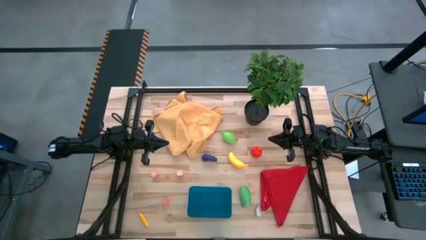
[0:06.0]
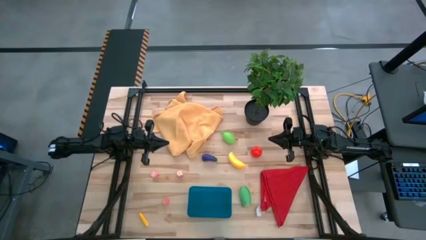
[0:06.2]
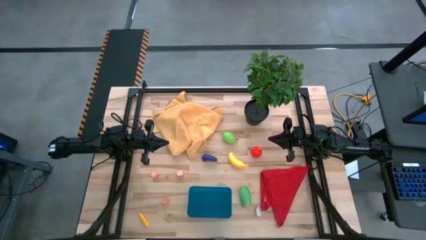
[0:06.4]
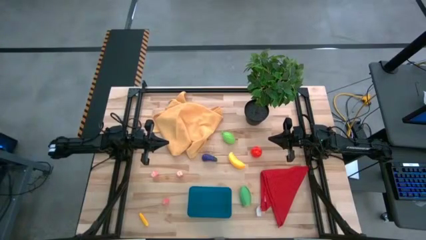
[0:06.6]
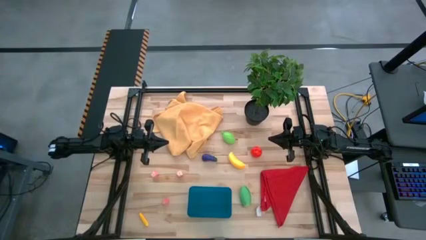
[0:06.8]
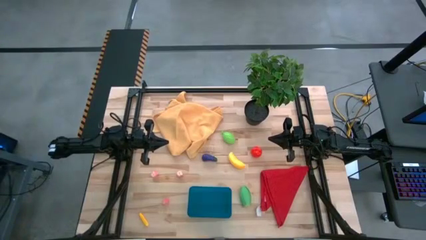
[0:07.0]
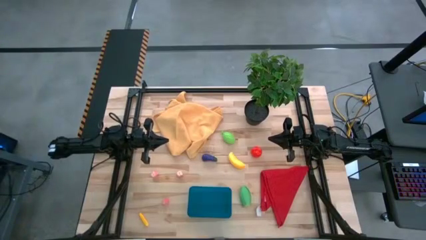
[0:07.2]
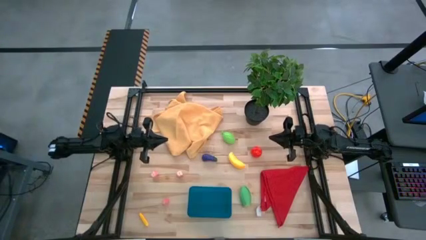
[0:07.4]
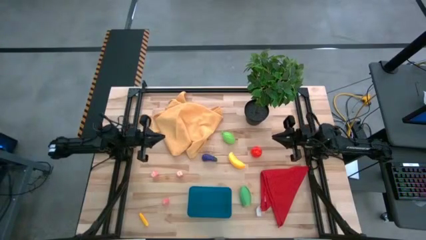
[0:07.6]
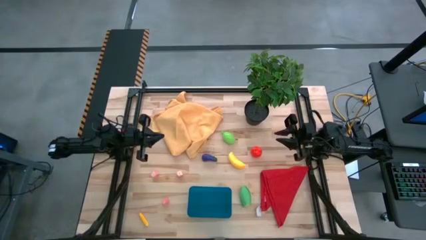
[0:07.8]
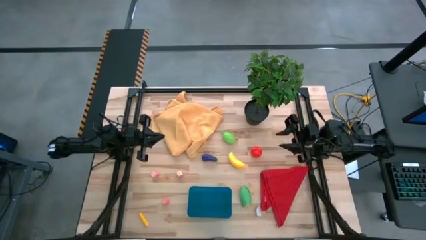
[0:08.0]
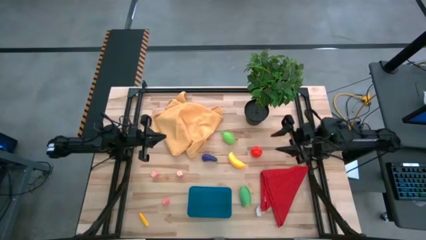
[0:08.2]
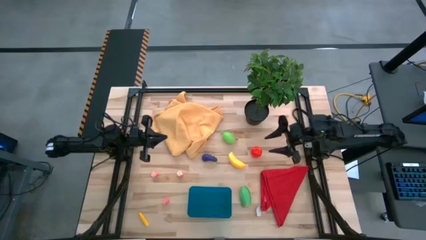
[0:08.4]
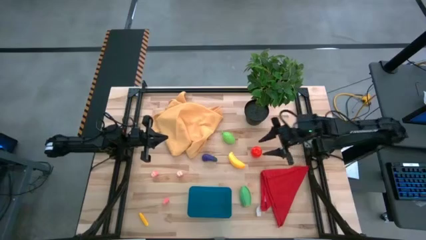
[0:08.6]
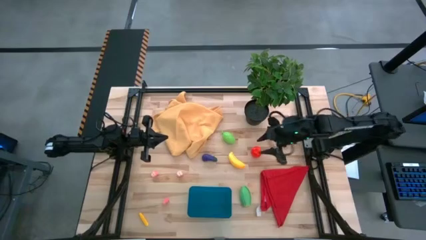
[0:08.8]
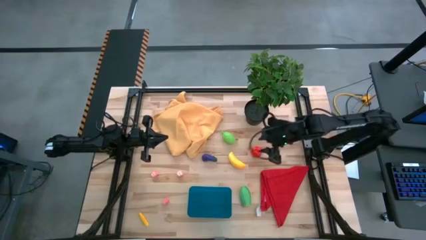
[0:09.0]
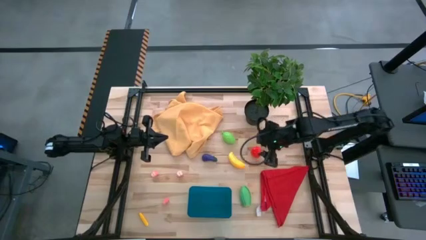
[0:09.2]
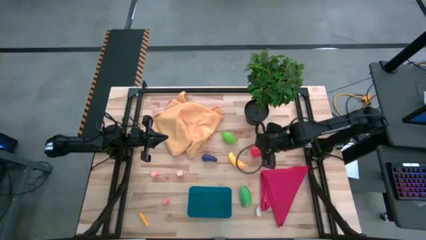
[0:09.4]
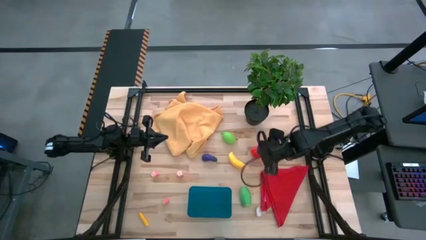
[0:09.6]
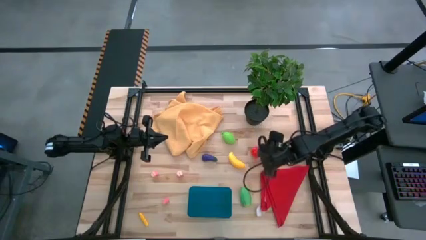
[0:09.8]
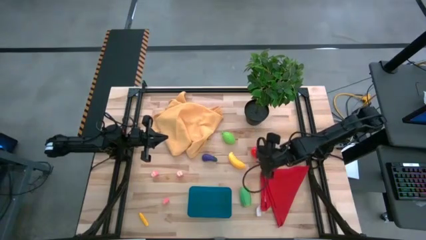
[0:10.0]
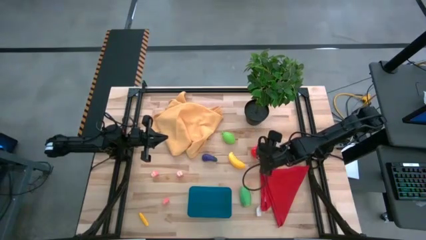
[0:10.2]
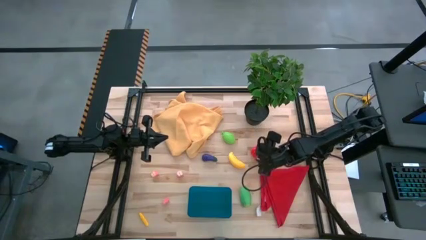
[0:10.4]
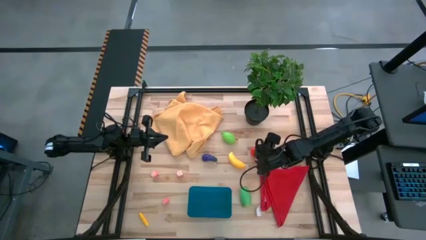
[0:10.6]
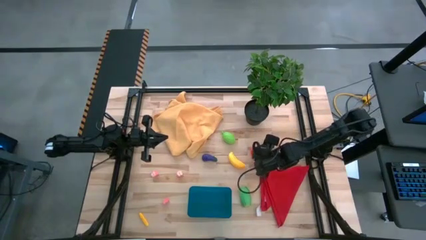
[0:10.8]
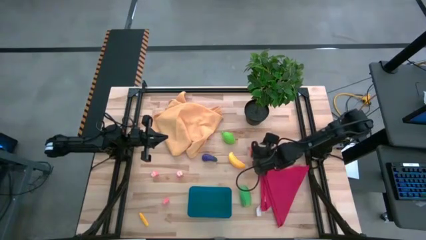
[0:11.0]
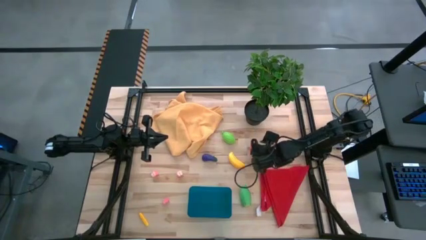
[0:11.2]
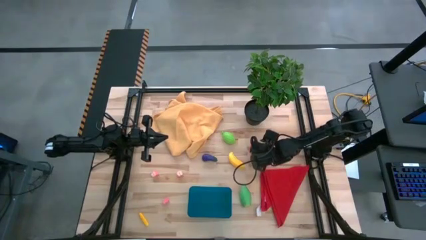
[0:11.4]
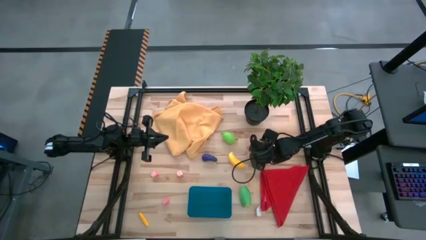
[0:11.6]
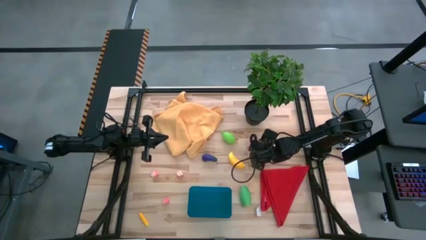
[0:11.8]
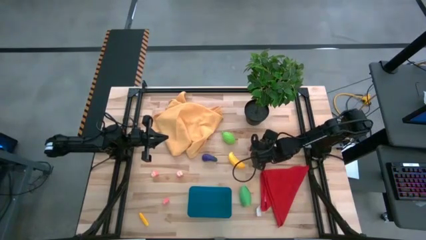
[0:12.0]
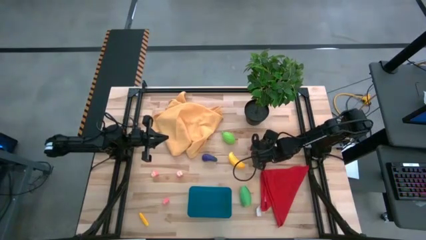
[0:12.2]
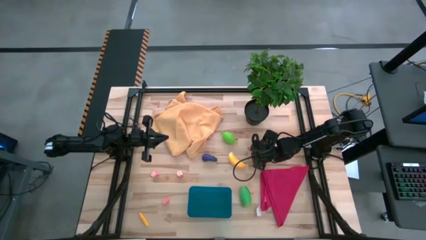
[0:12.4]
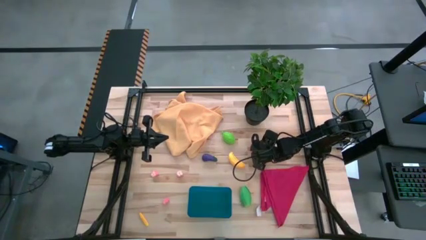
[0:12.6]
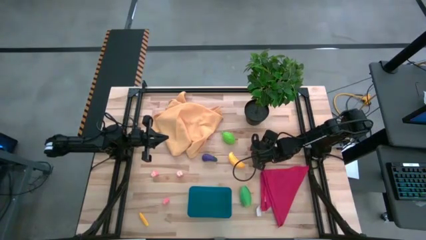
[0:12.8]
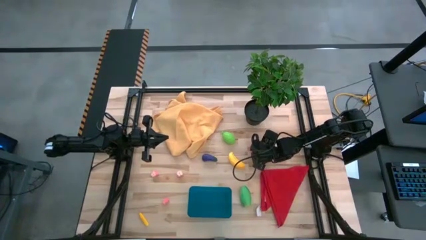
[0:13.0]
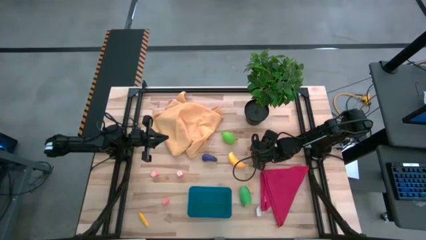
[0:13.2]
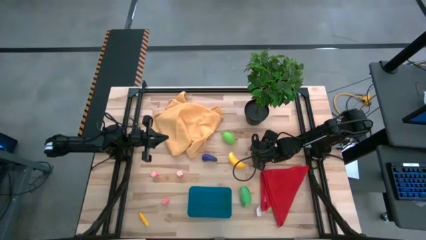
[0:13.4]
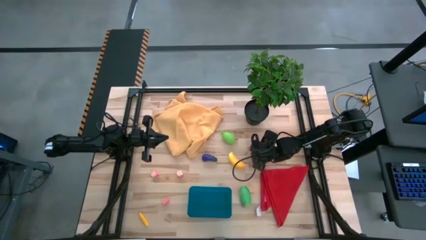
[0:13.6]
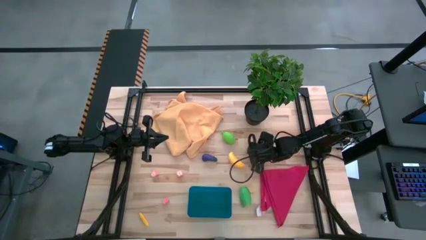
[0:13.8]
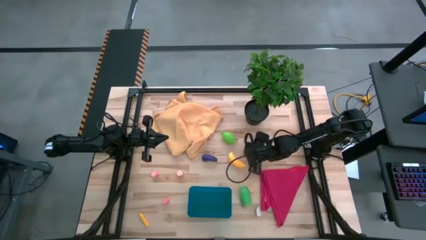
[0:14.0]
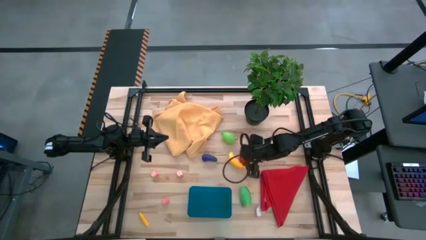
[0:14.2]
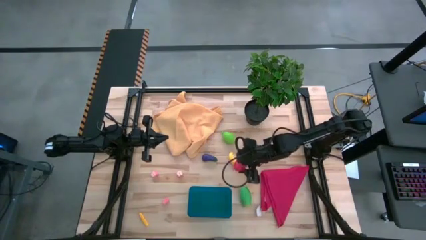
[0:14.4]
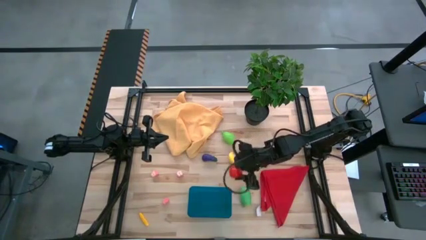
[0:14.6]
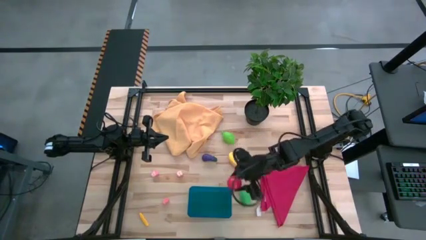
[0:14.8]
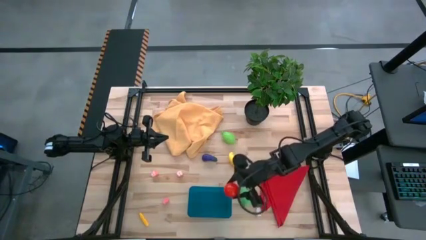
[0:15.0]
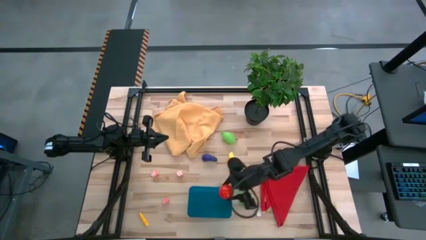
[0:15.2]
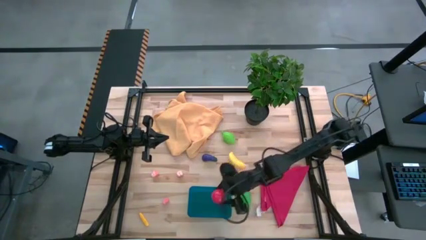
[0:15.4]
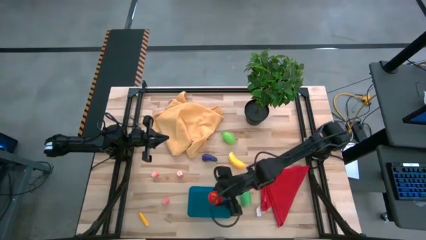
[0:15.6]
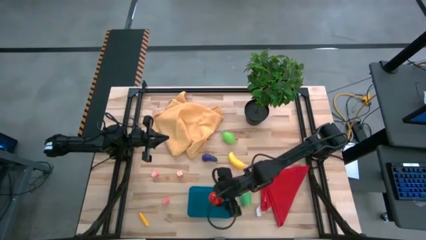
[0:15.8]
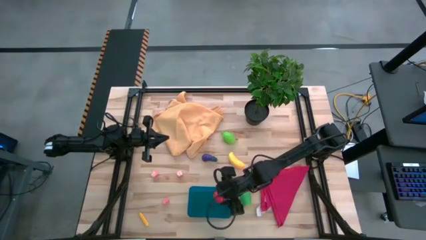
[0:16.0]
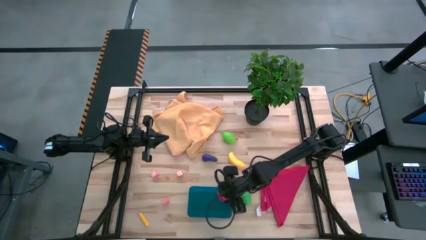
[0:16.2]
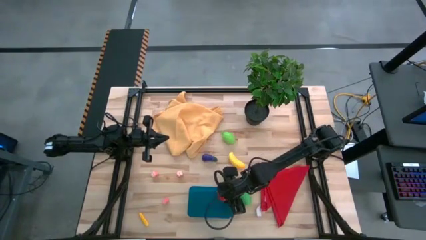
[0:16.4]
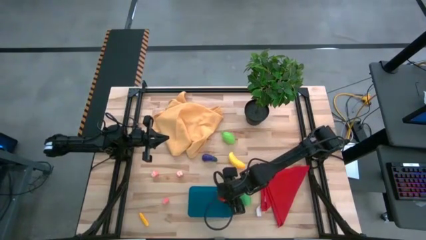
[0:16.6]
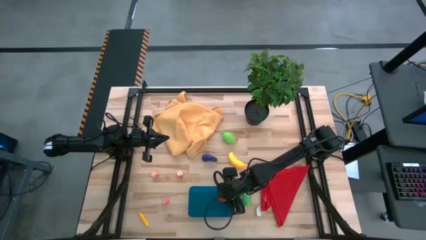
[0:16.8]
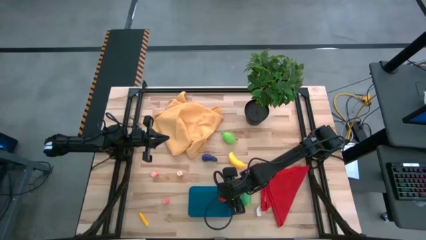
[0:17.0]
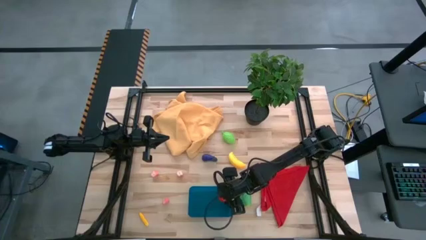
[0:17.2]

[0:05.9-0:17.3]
Task: Pick and placing Produce into tupperware
Put the red tomato into the blue bin
